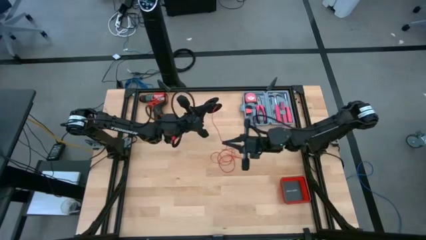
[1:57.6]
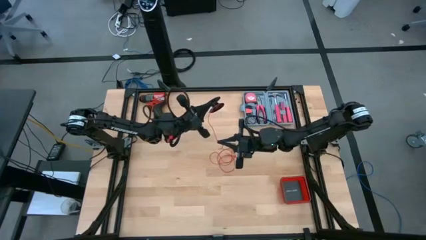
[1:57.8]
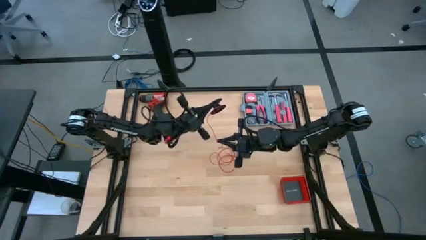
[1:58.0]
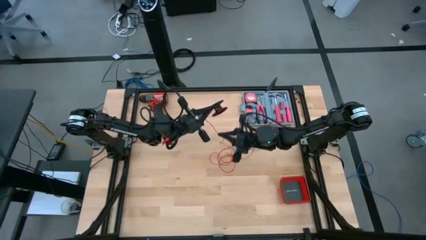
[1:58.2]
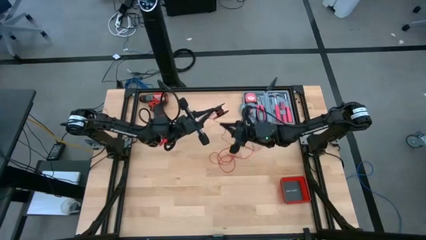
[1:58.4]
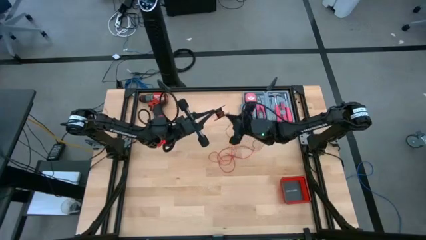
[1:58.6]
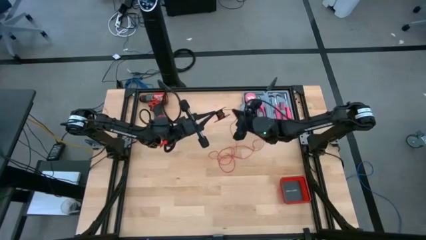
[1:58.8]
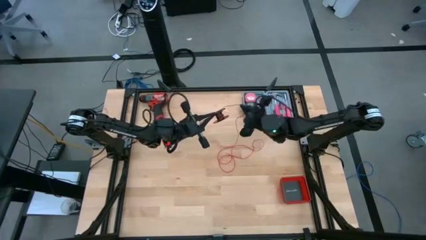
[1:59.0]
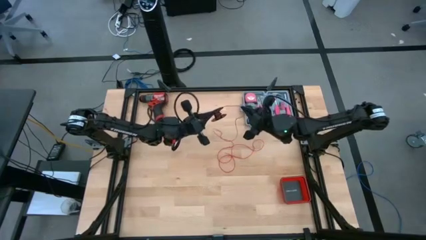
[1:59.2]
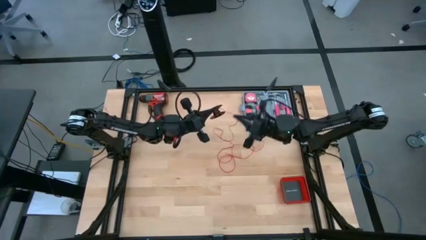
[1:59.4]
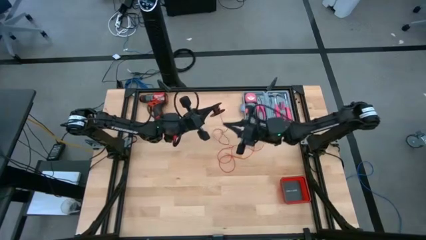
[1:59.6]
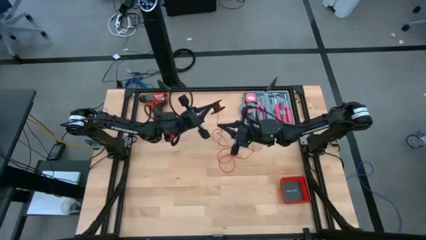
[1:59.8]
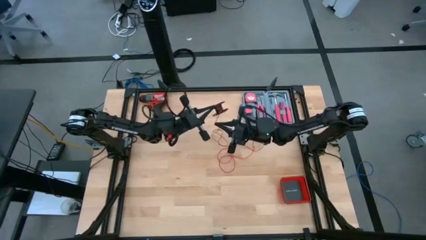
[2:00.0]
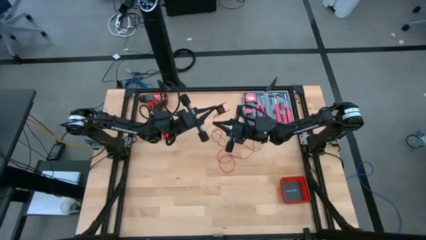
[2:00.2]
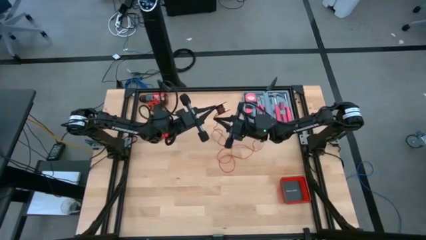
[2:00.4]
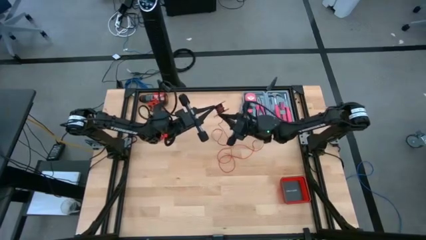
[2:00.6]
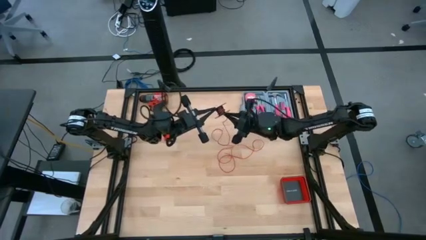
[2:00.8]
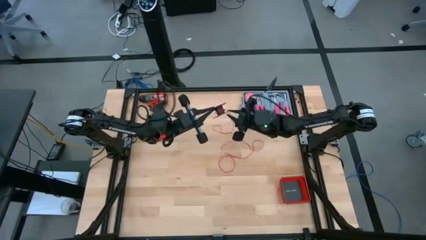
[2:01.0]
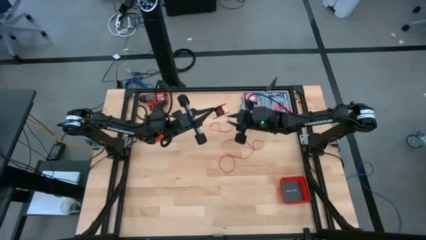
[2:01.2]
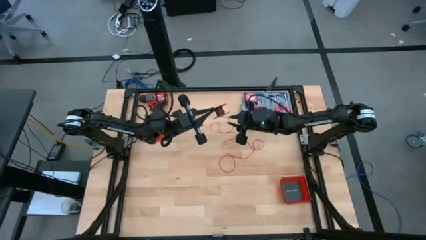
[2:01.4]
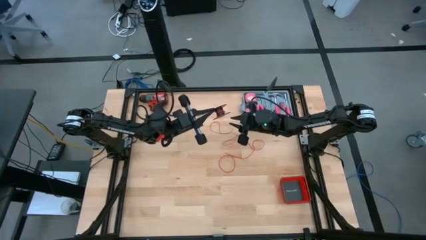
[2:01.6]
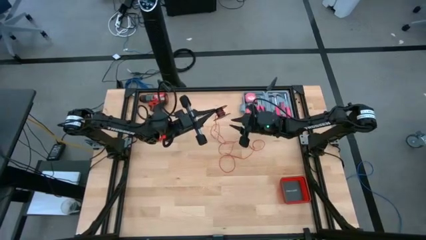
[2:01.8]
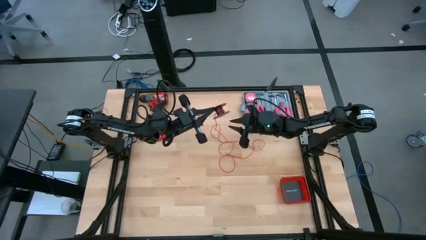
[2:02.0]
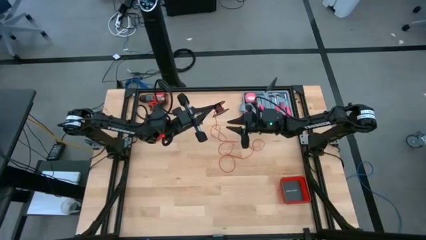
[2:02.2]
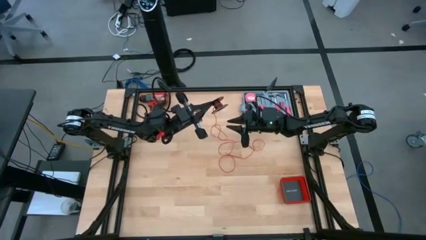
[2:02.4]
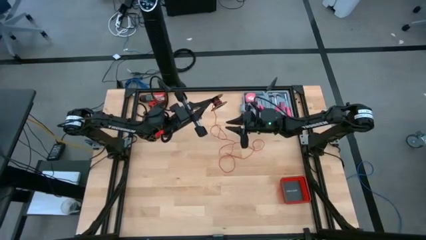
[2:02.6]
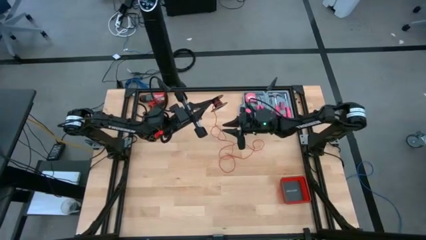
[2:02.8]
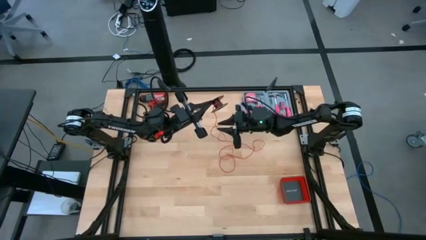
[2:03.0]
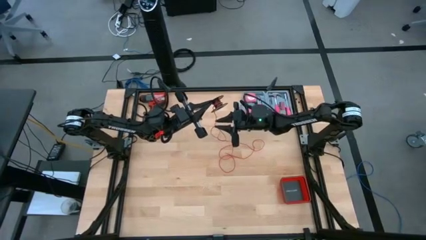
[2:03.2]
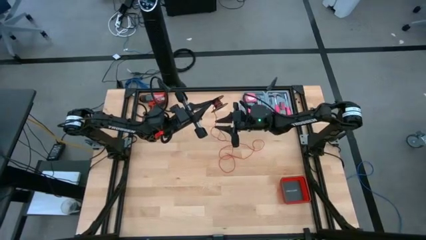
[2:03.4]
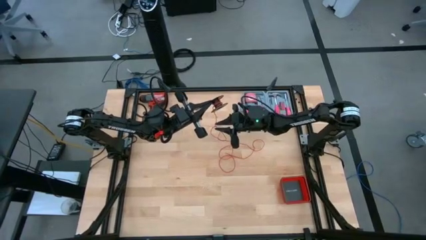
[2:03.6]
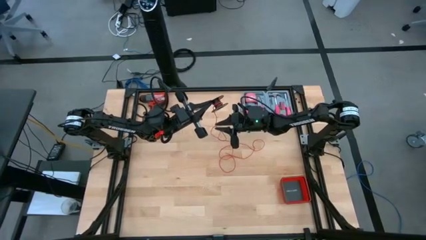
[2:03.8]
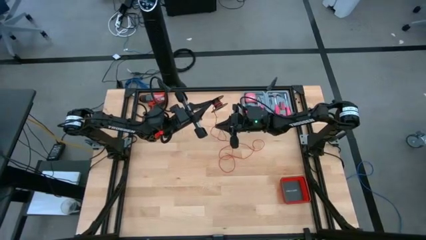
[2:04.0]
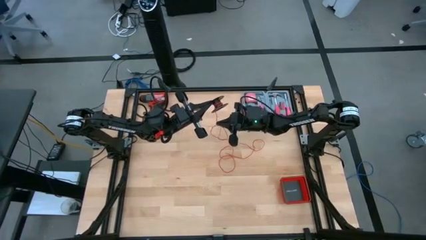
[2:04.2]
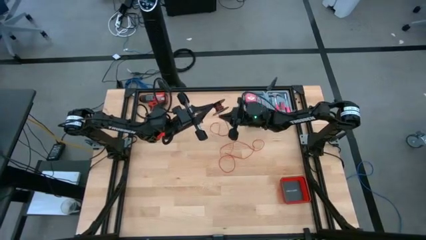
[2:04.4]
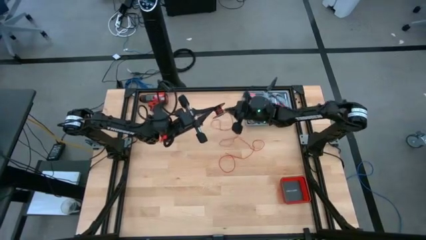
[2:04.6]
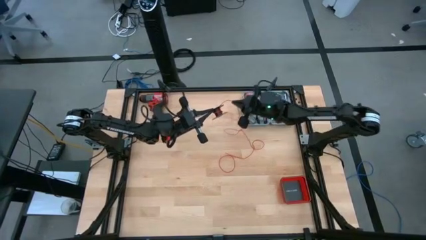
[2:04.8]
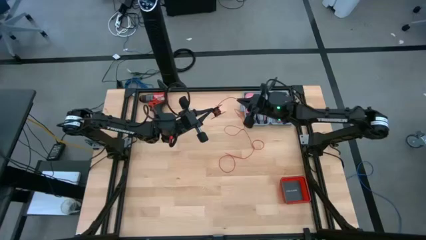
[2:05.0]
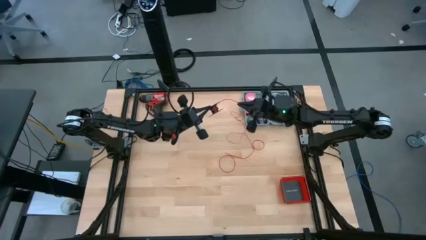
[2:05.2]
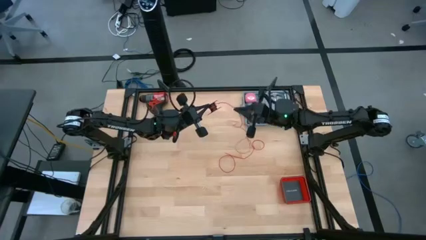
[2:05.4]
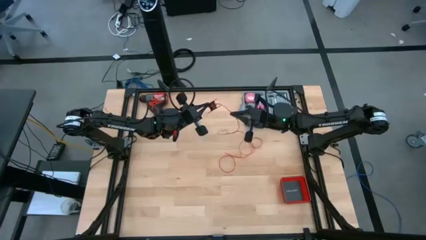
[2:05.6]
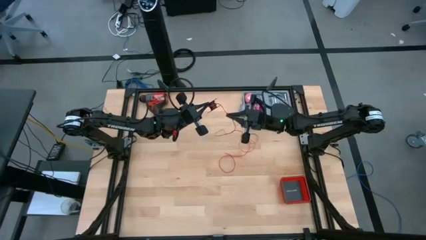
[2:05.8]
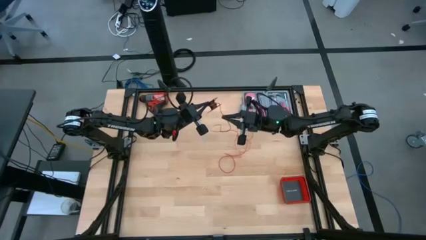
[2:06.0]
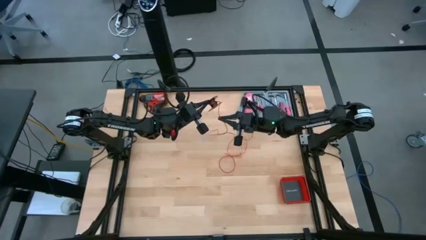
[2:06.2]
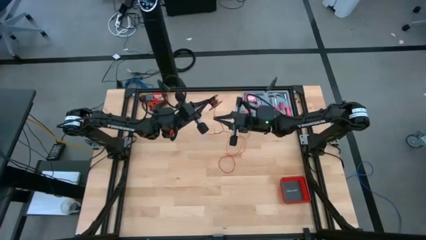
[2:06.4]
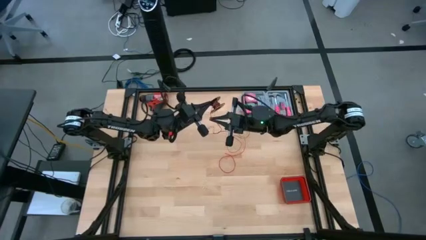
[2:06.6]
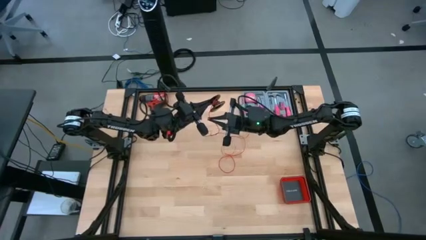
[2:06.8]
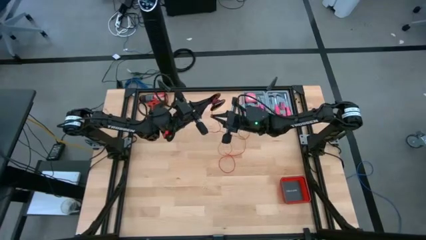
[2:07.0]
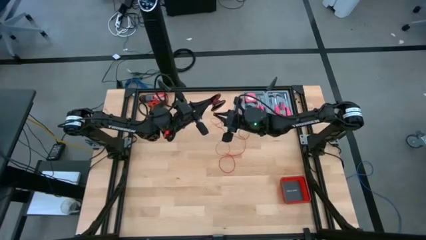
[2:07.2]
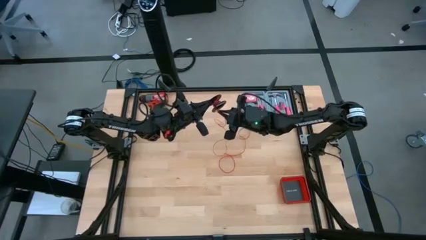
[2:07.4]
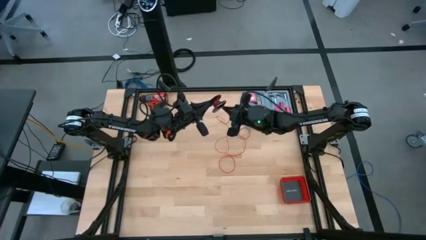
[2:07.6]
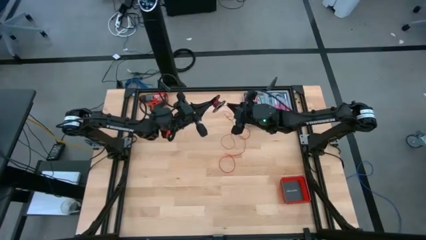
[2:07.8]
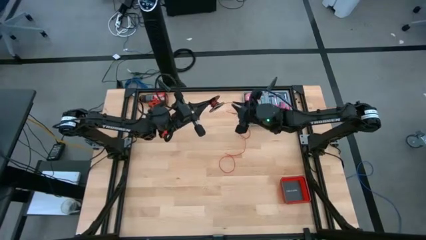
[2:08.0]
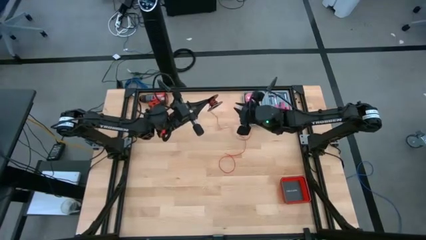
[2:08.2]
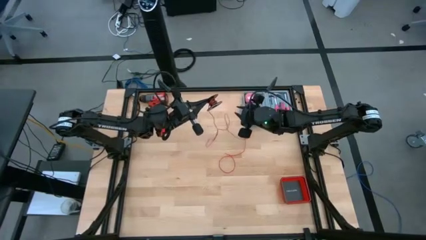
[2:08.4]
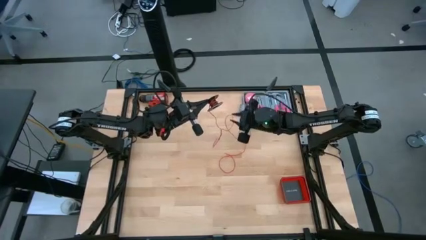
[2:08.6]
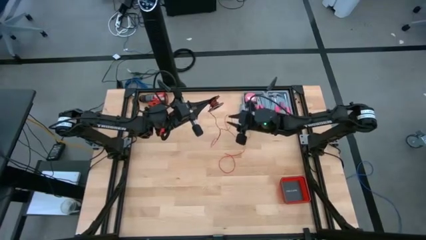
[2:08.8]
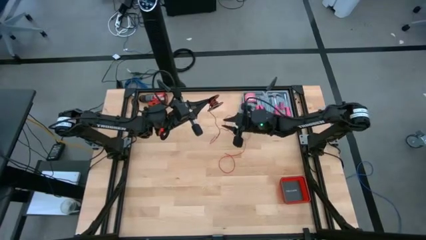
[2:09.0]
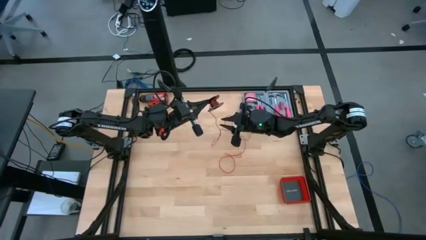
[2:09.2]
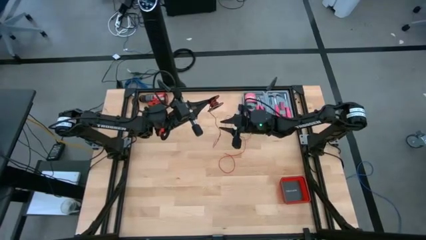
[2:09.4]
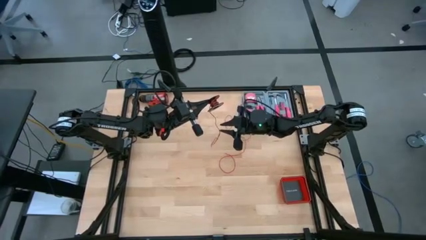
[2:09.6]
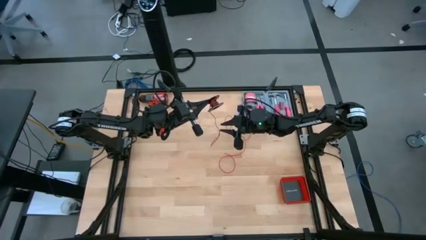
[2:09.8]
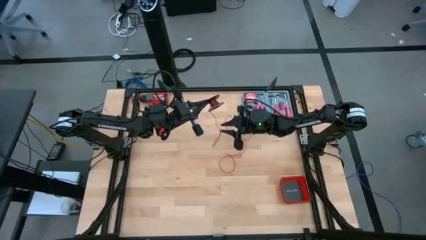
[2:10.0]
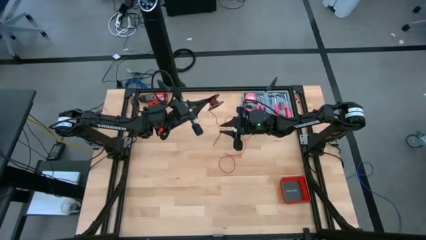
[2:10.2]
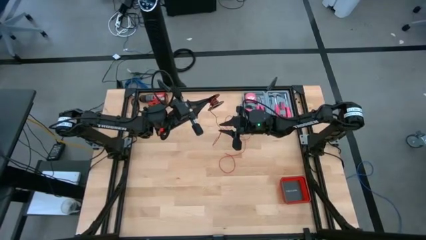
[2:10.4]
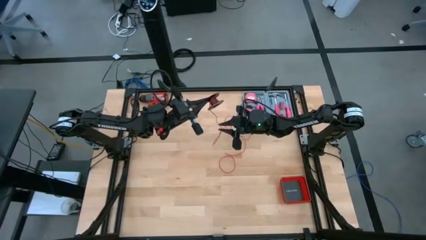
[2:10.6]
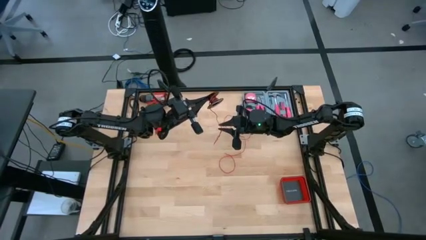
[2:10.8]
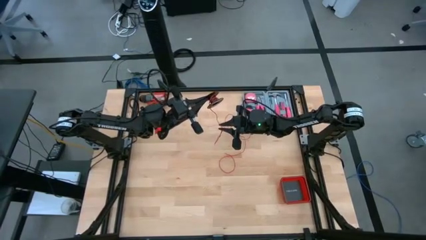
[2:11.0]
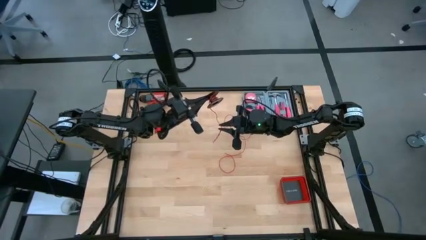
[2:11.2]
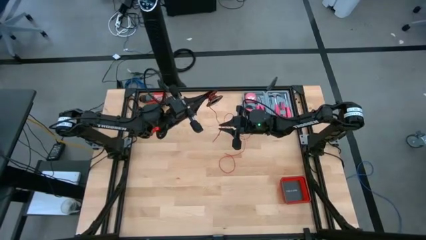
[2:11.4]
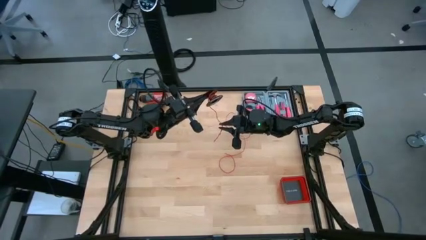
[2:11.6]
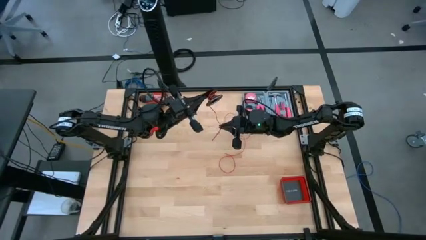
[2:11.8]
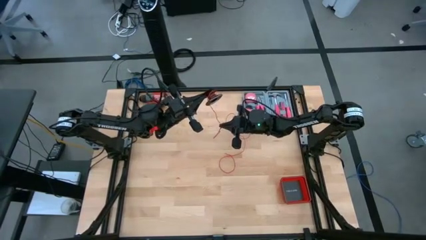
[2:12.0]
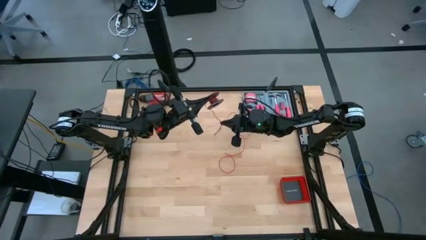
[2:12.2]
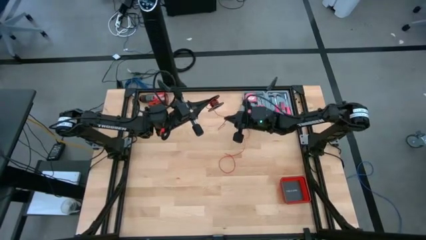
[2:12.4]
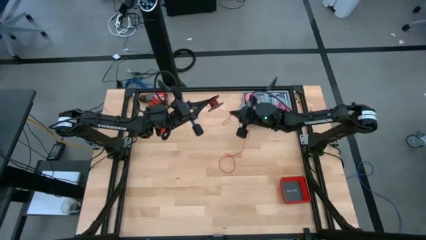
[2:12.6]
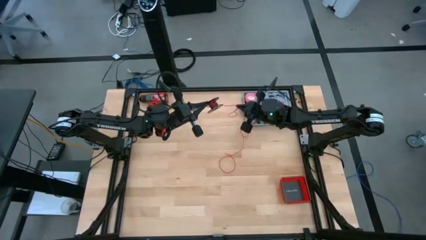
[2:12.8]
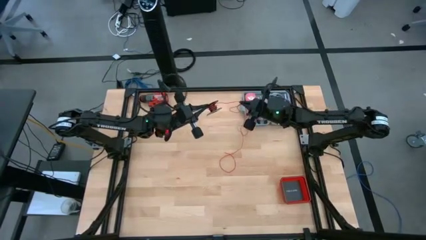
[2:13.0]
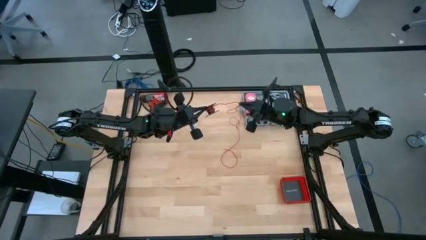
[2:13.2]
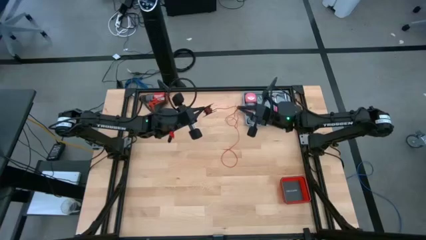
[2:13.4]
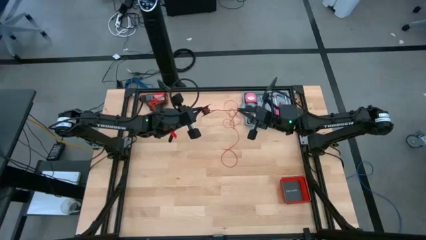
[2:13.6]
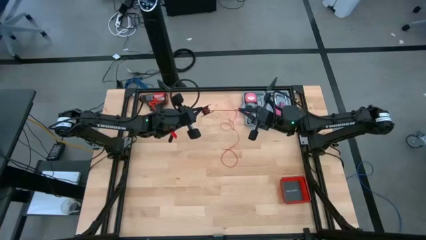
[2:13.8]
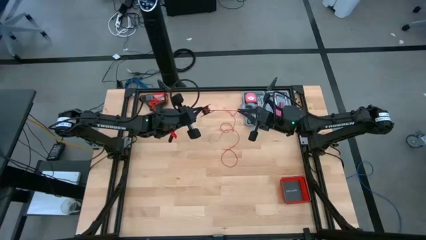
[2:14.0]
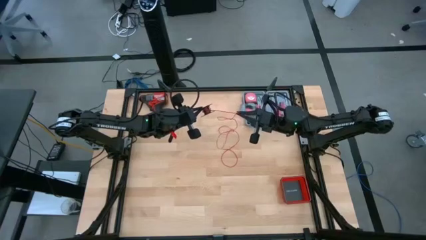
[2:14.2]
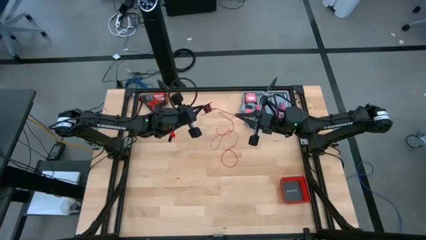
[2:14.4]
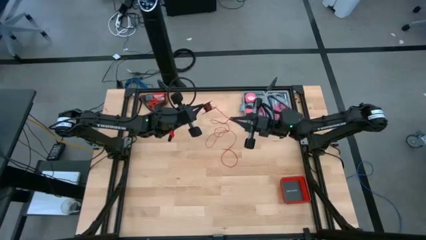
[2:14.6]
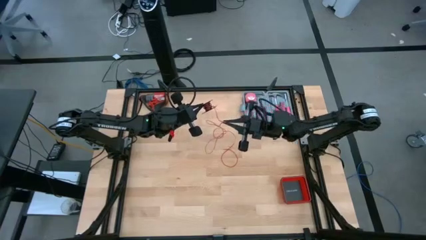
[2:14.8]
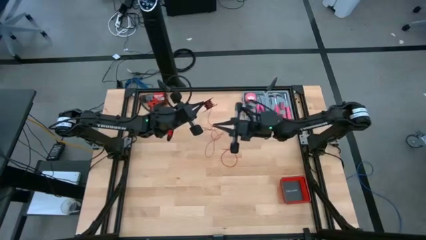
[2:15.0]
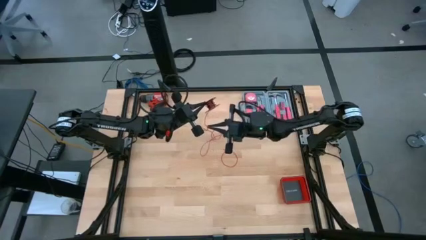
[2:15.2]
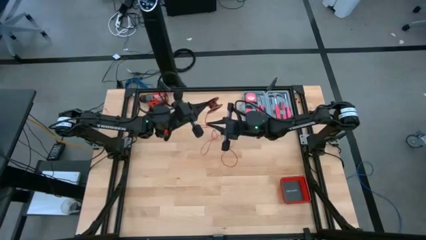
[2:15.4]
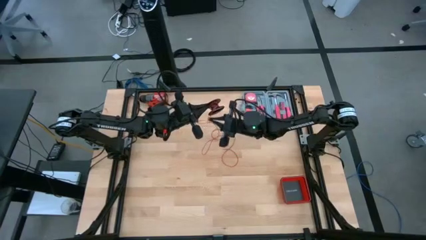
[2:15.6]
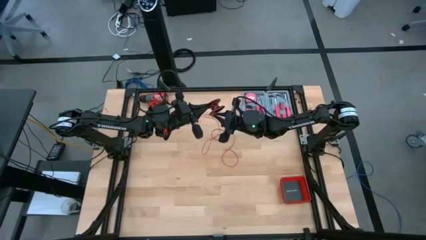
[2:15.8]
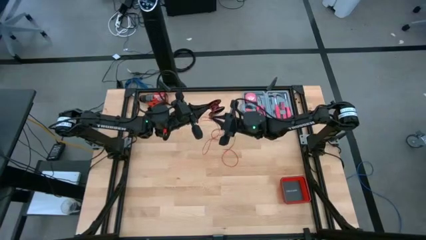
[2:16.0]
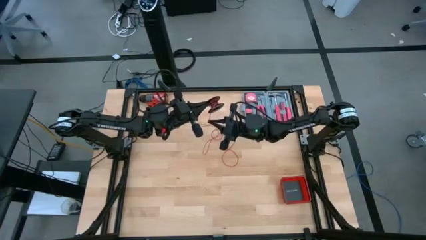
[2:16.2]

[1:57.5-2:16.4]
Task: Coil cords
Coil the red wire on the black spool
